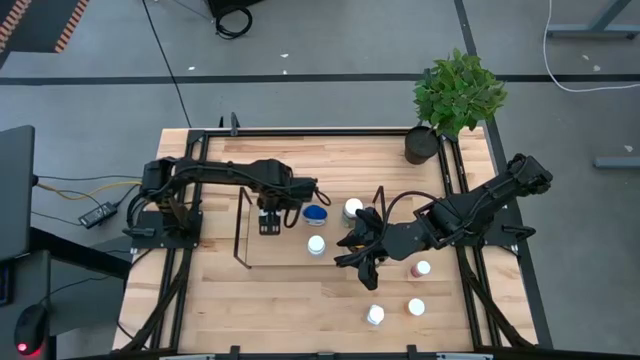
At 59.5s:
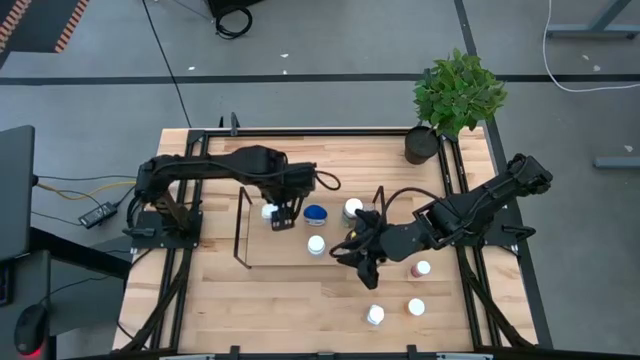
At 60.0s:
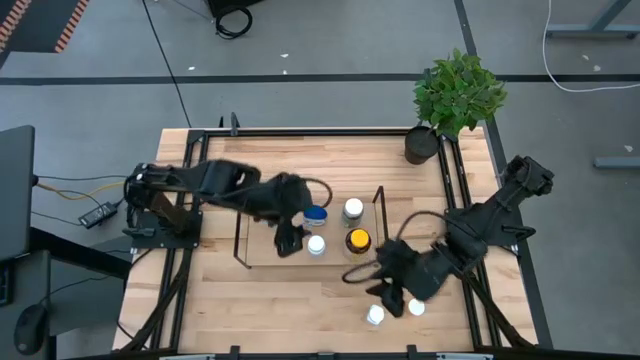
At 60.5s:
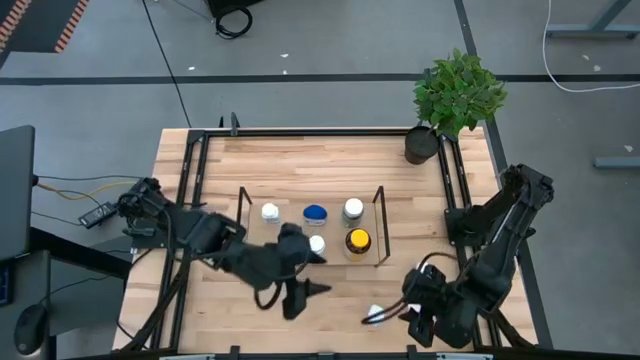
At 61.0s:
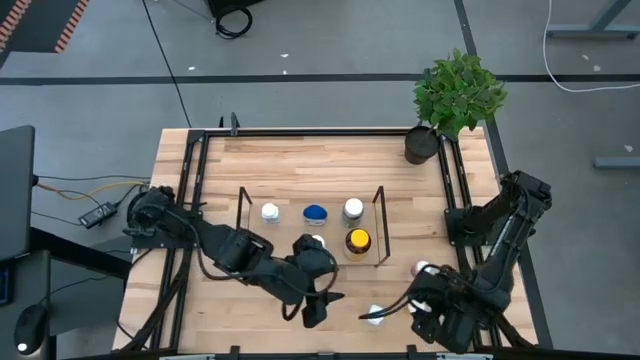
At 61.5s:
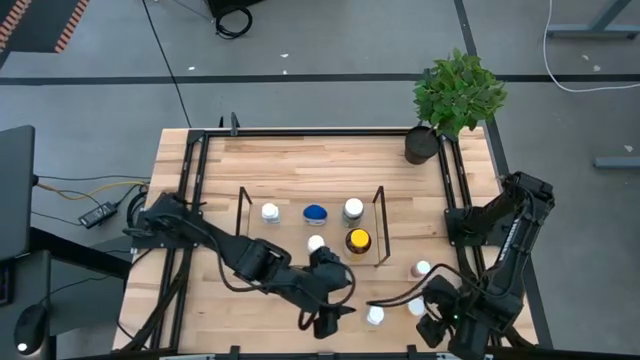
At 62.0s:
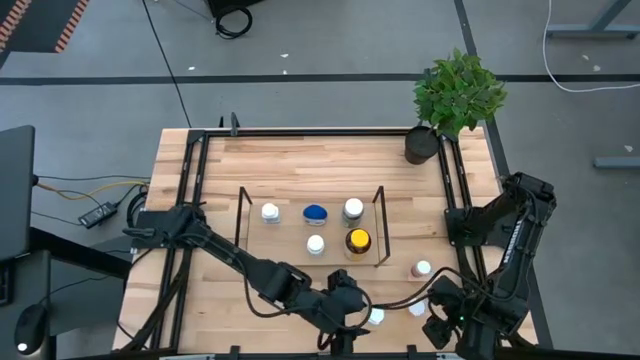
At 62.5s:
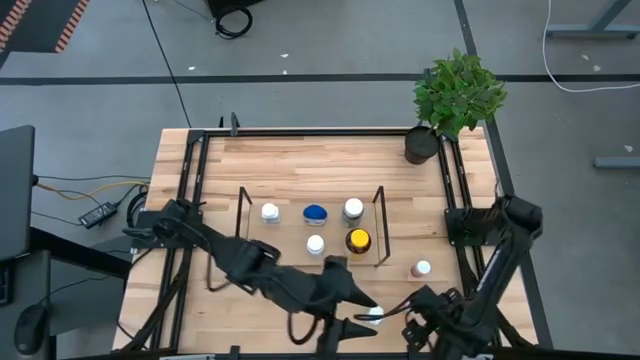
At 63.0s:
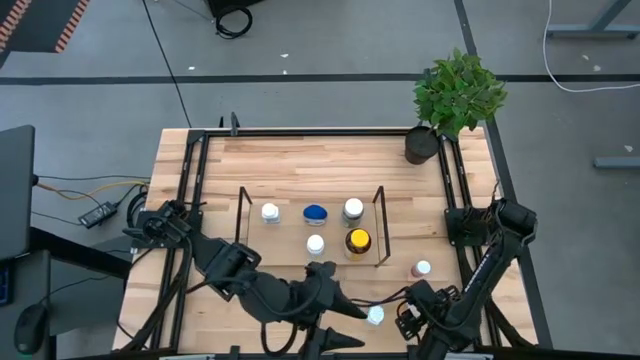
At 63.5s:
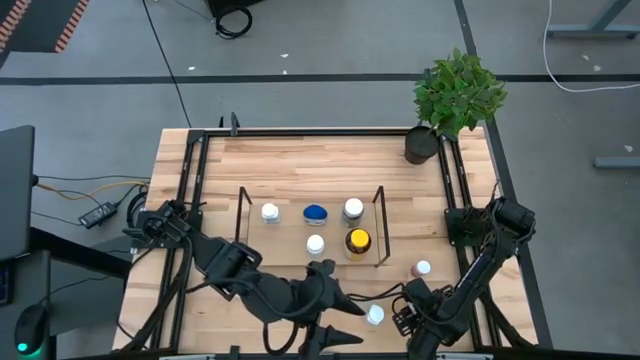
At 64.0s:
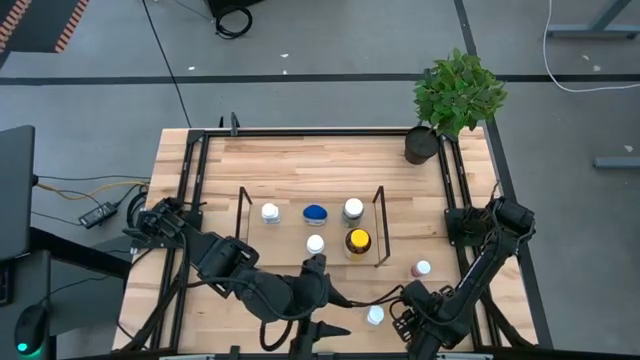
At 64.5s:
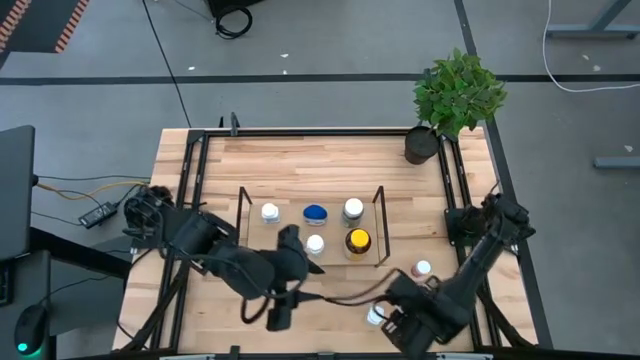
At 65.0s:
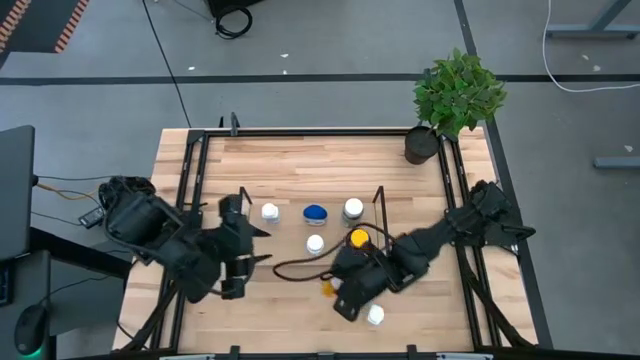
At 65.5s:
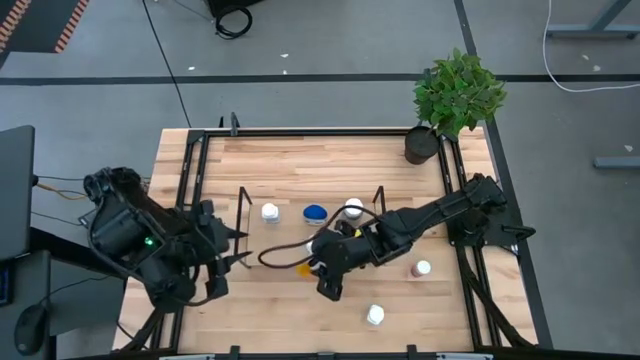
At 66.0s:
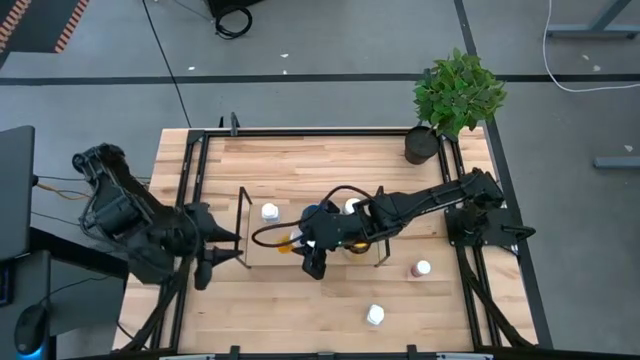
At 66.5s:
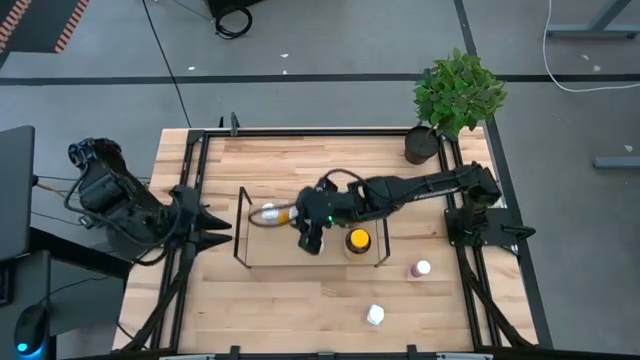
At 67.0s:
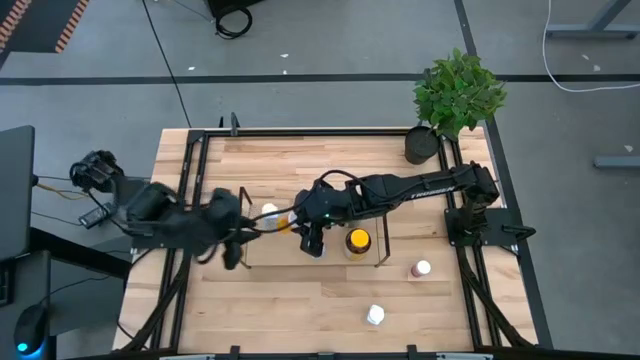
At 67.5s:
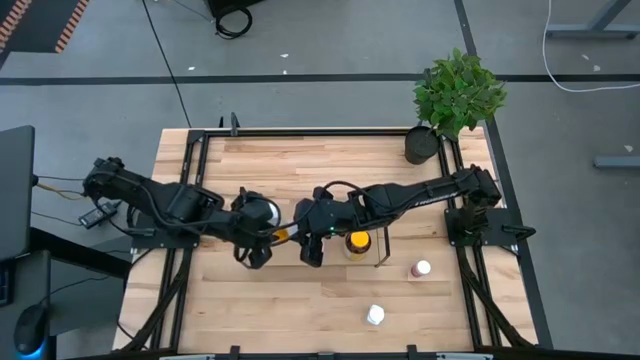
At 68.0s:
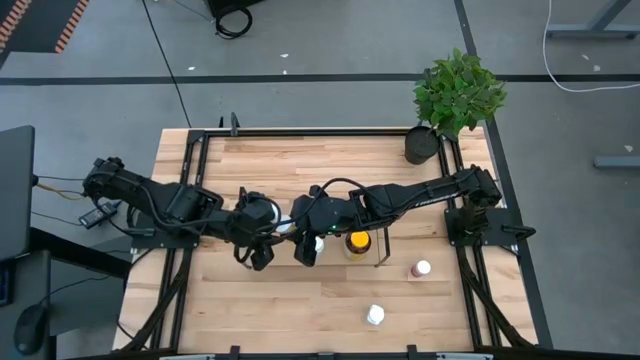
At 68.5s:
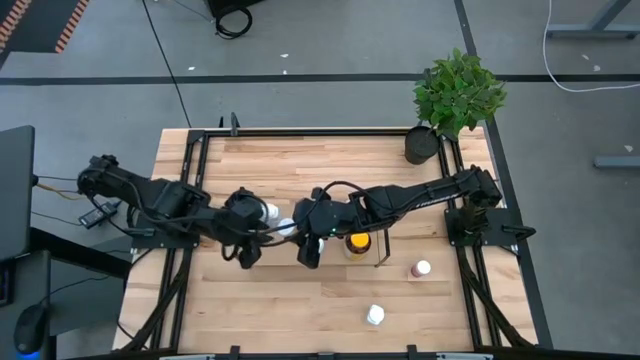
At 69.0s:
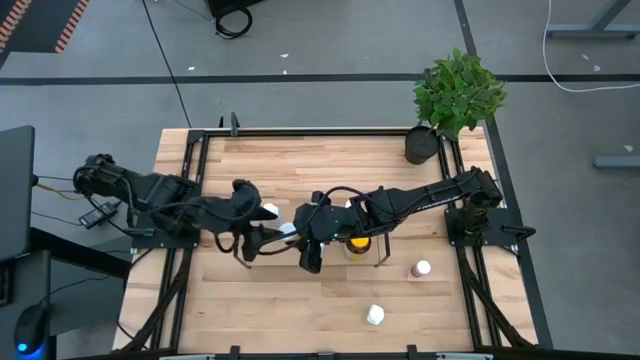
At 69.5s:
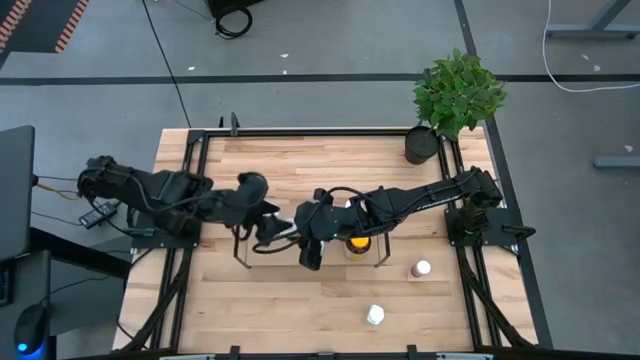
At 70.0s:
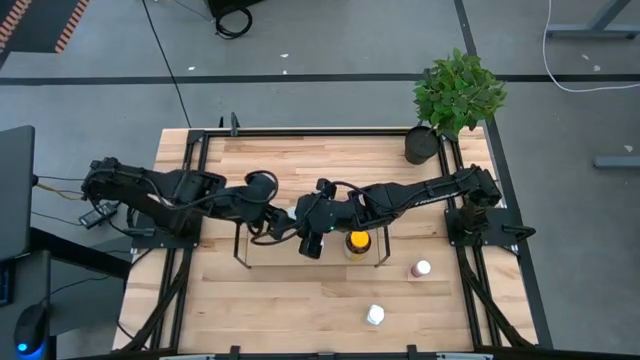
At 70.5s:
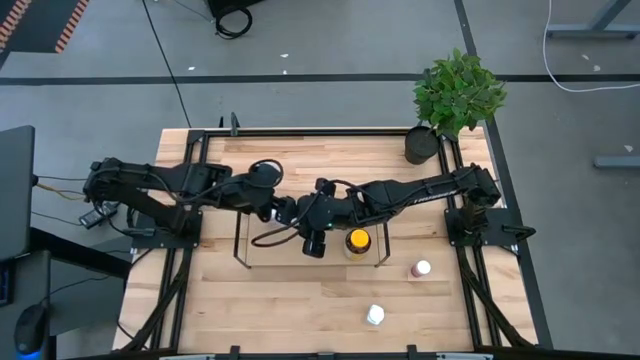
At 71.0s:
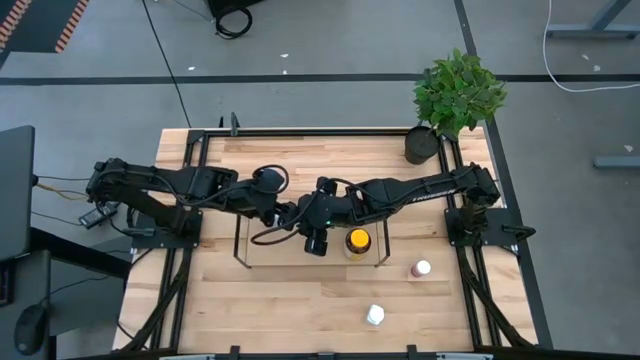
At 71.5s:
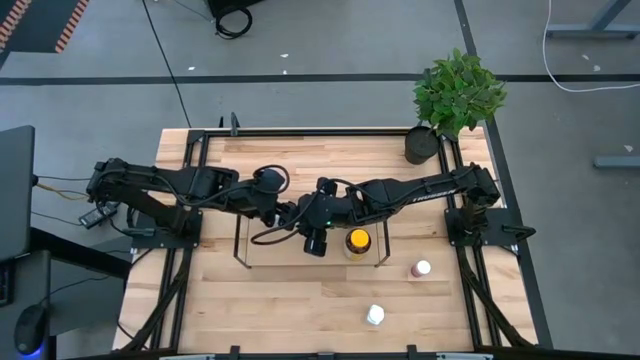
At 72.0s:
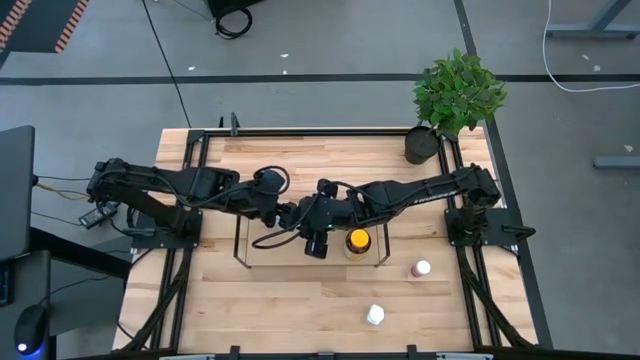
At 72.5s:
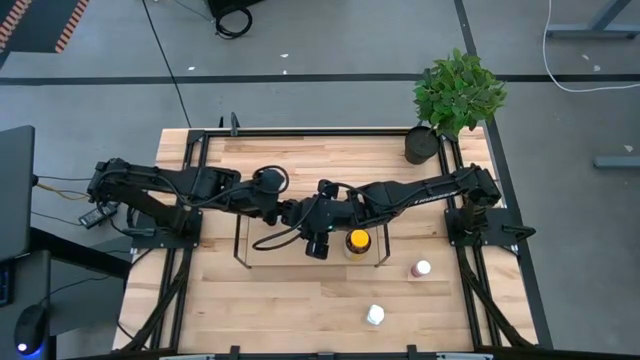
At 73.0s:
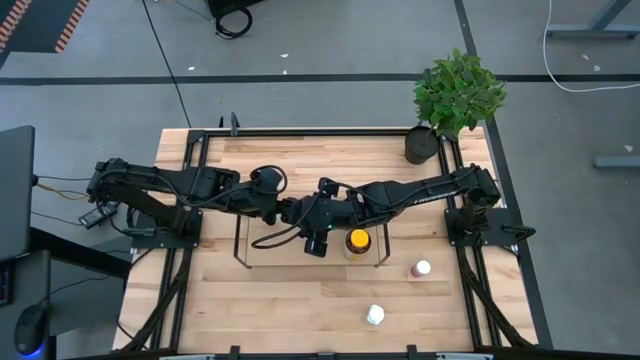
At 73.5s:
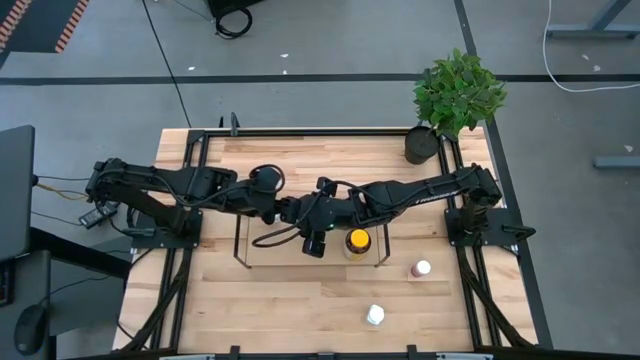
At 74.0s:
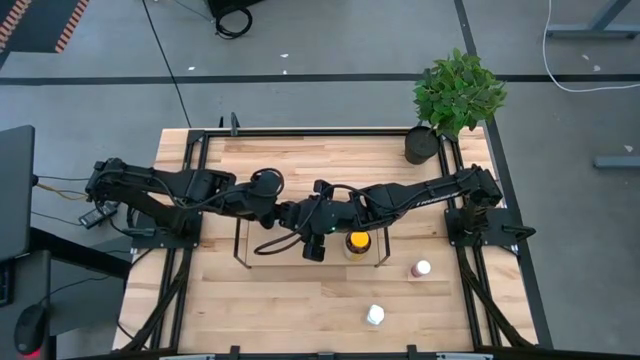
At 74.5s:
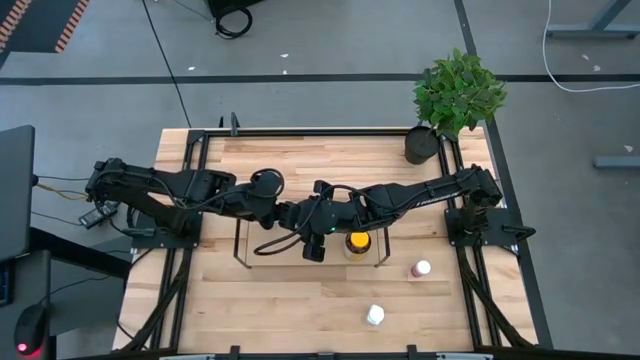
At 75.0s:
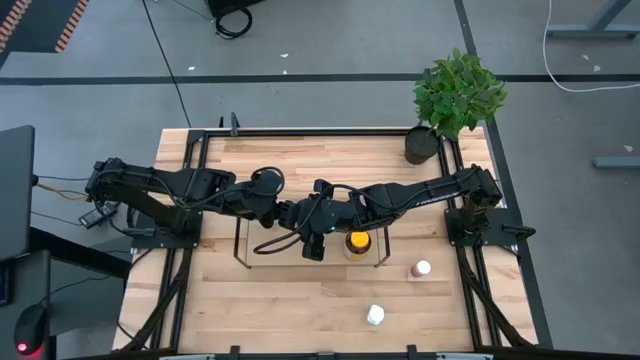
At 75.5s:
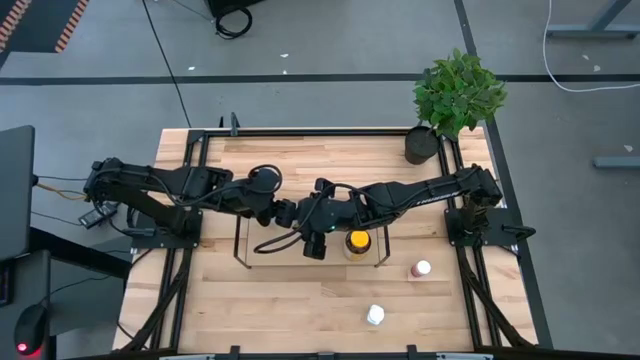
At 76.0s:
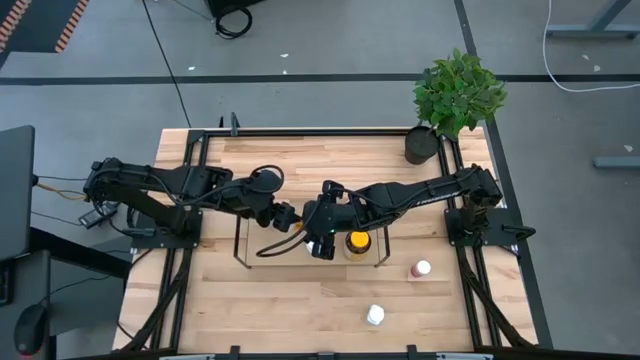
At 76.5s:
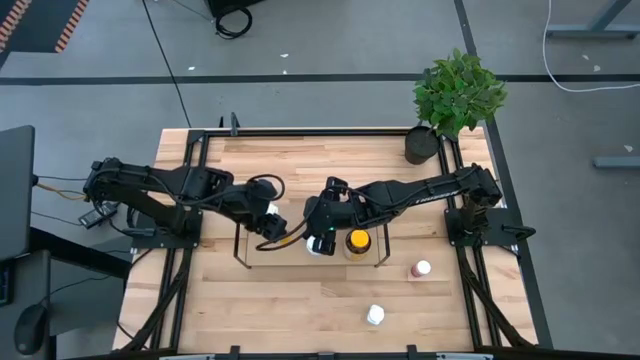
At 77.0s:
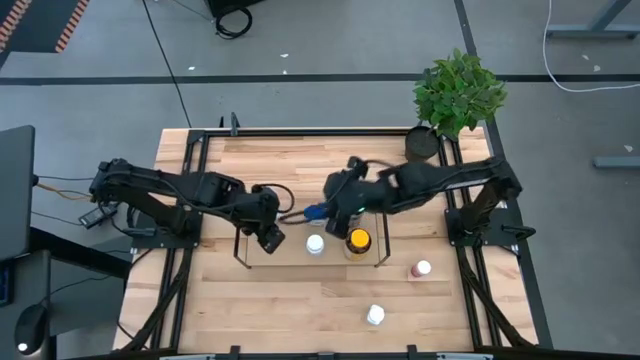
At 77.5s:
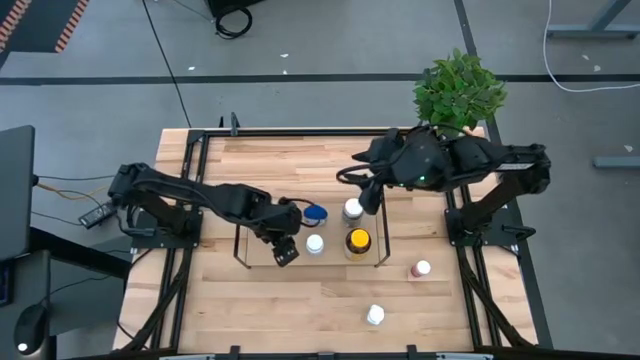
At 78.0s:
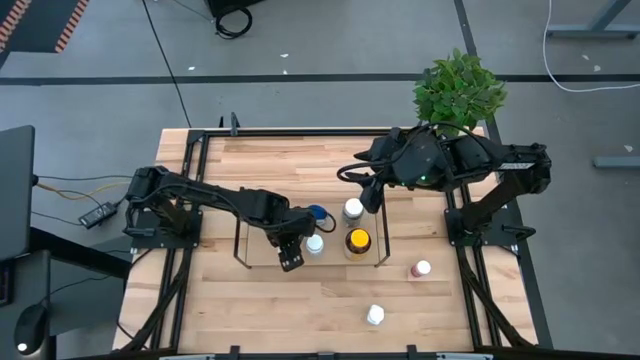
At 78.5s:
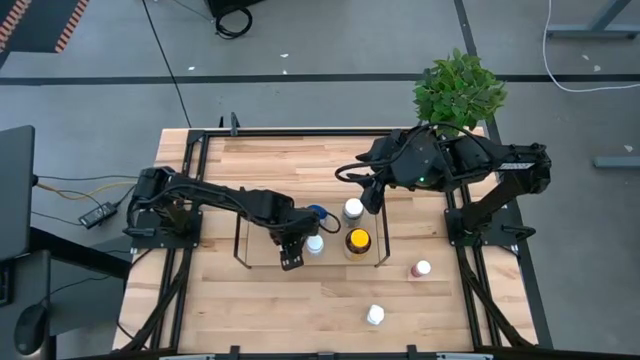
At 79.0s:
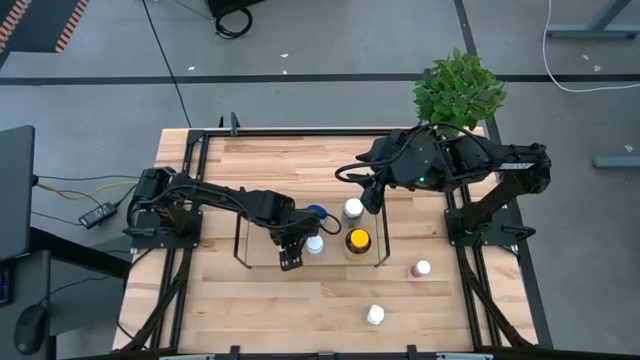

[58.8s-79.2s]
Task: Pick and place medicine bottles onto shelf by color
Put the orange medicine bottle on the shelf
